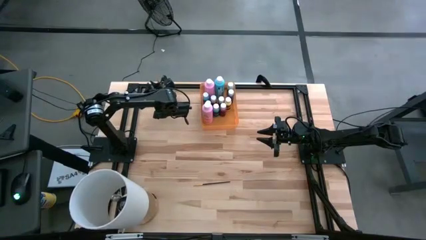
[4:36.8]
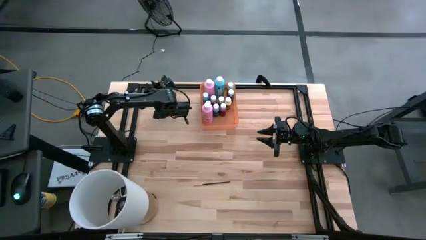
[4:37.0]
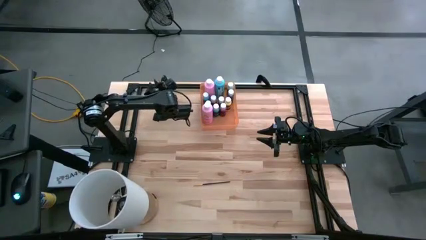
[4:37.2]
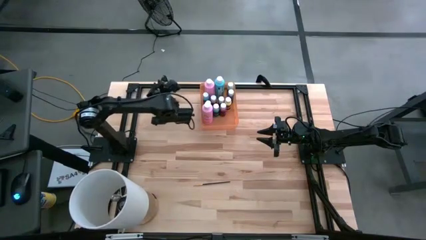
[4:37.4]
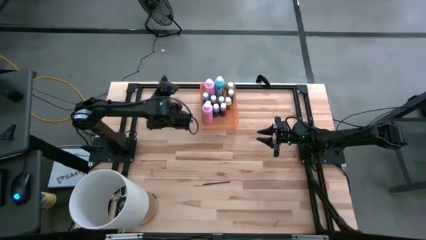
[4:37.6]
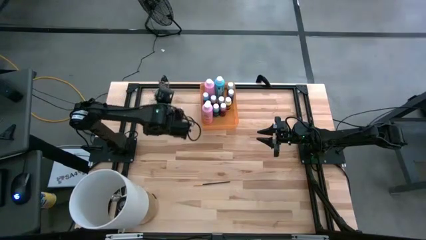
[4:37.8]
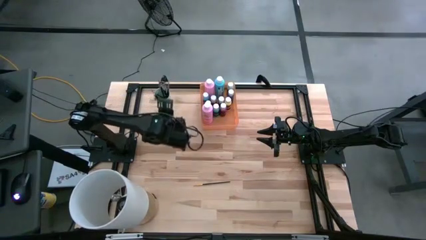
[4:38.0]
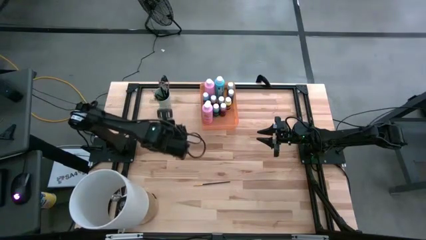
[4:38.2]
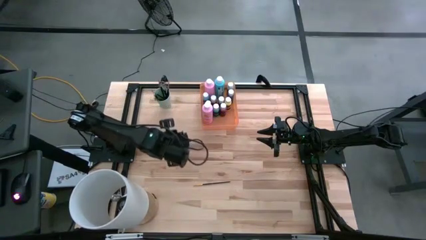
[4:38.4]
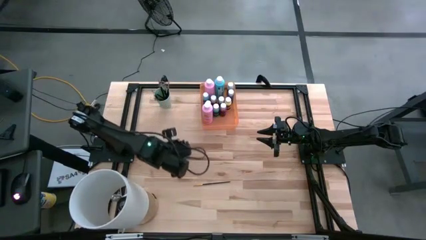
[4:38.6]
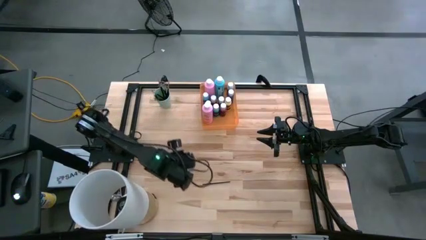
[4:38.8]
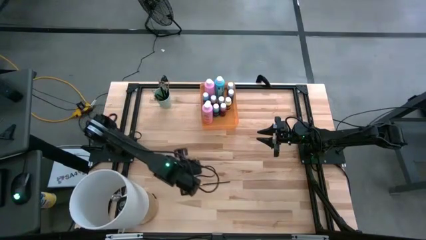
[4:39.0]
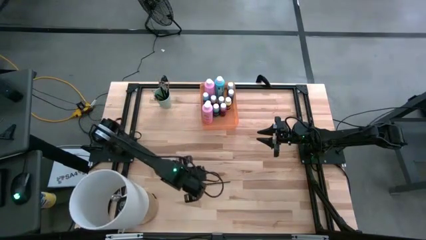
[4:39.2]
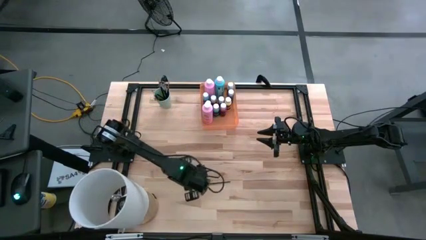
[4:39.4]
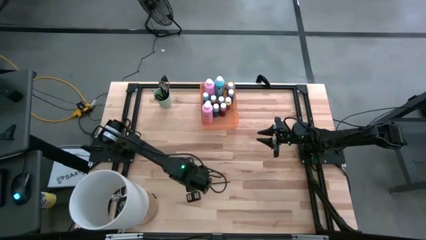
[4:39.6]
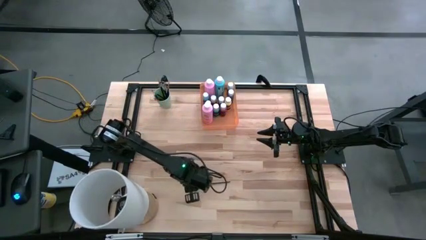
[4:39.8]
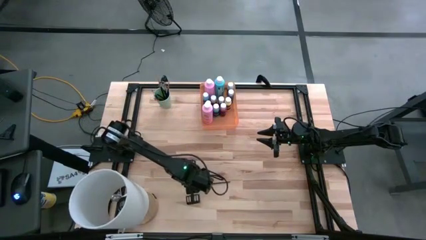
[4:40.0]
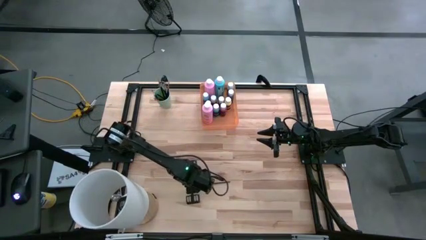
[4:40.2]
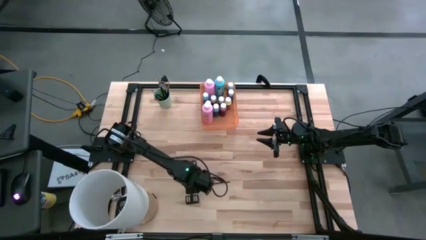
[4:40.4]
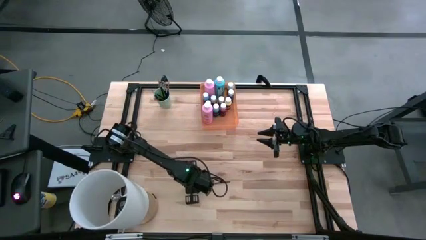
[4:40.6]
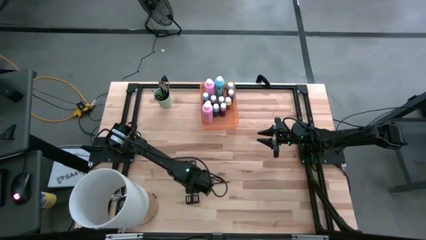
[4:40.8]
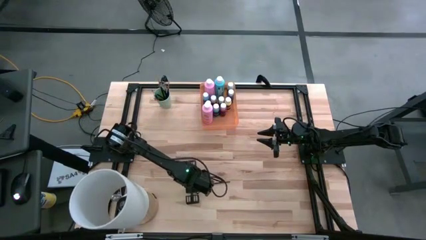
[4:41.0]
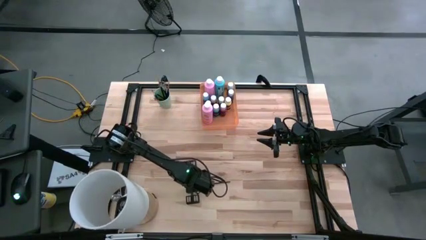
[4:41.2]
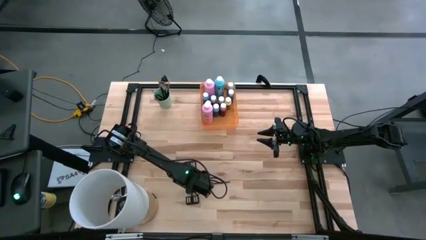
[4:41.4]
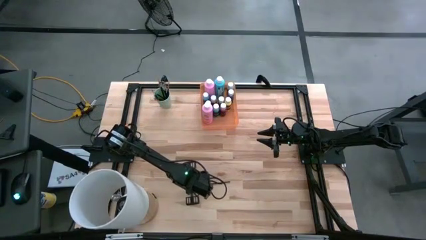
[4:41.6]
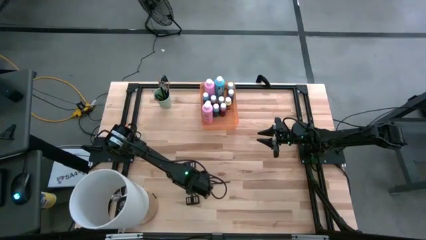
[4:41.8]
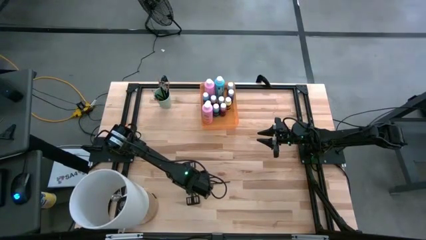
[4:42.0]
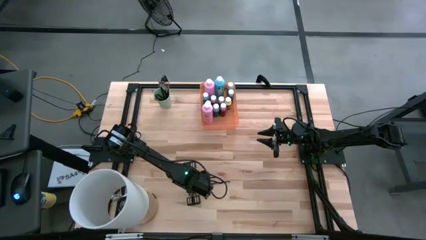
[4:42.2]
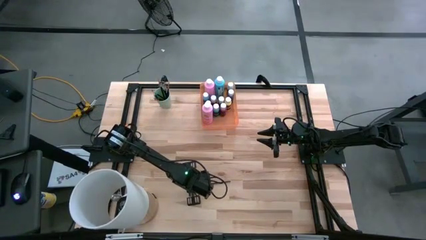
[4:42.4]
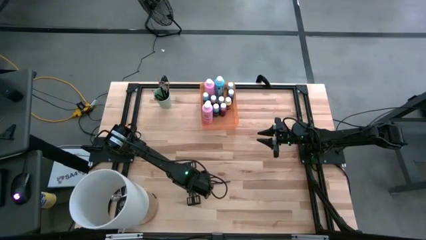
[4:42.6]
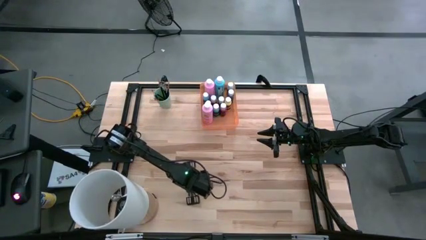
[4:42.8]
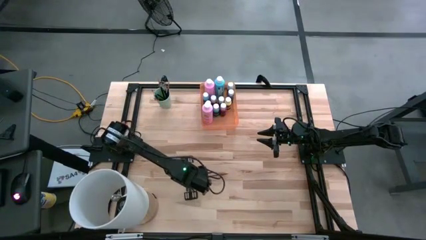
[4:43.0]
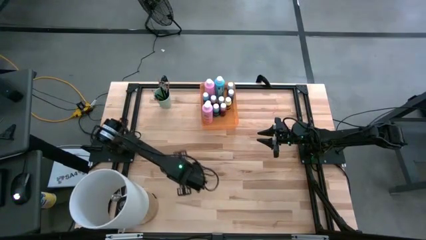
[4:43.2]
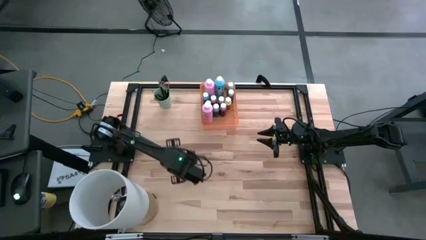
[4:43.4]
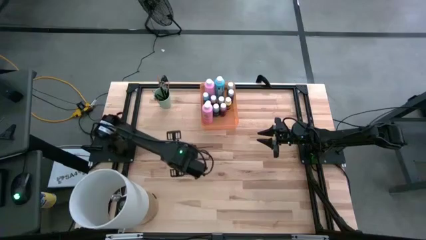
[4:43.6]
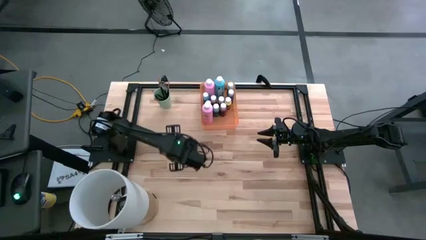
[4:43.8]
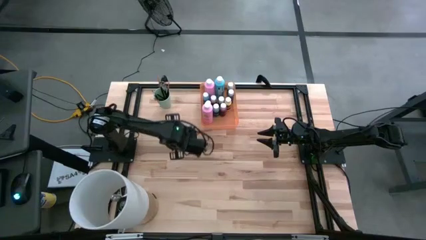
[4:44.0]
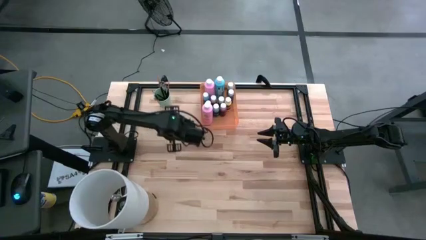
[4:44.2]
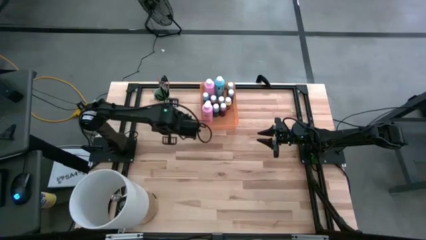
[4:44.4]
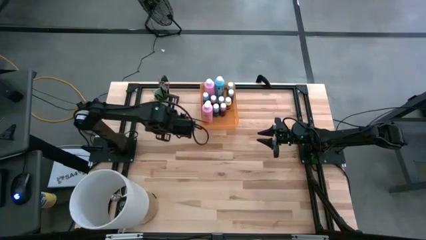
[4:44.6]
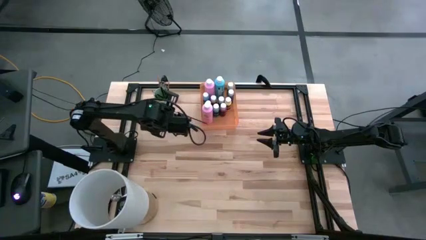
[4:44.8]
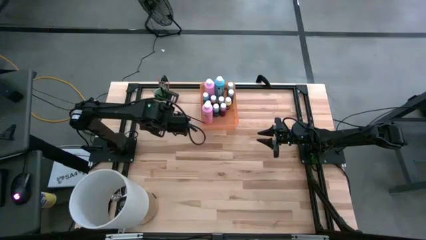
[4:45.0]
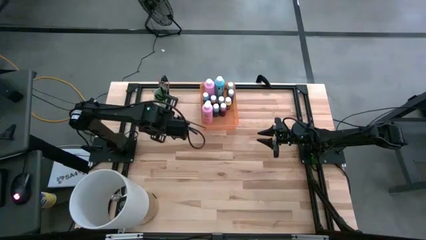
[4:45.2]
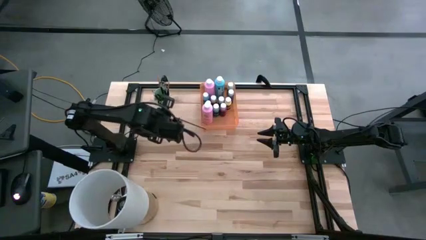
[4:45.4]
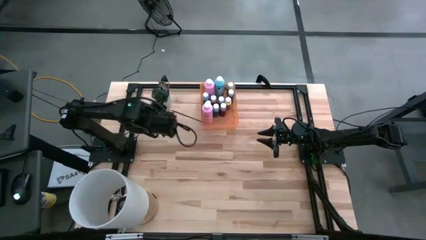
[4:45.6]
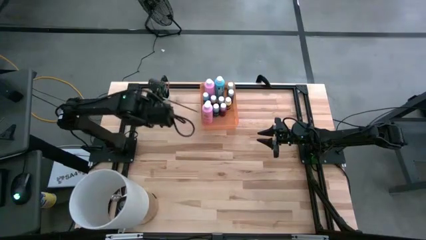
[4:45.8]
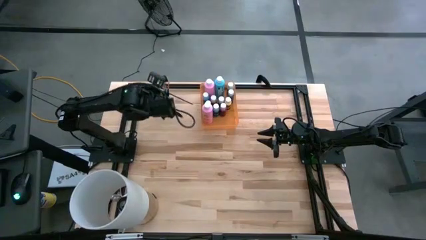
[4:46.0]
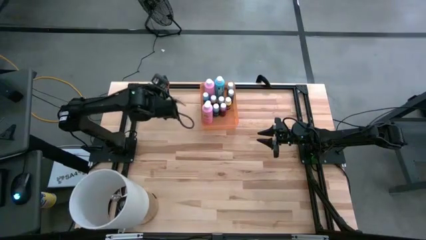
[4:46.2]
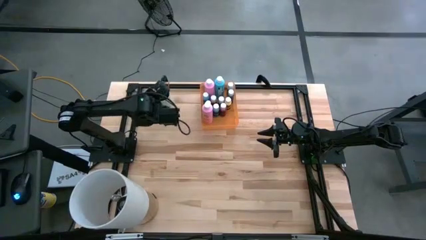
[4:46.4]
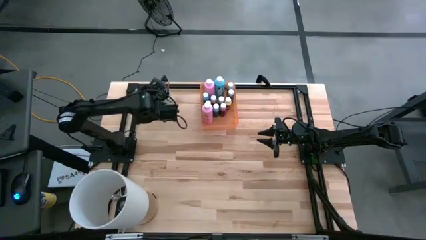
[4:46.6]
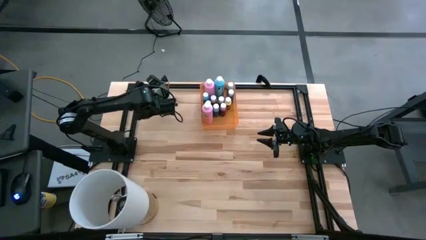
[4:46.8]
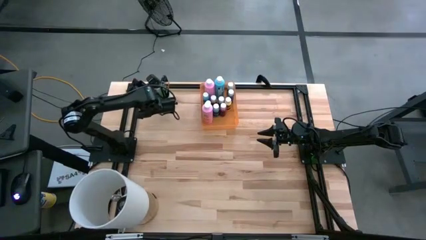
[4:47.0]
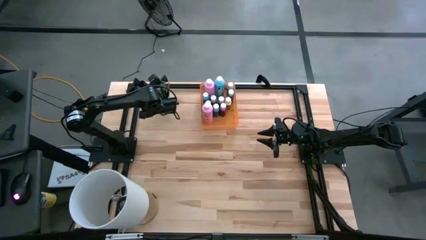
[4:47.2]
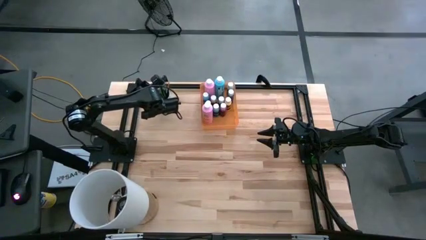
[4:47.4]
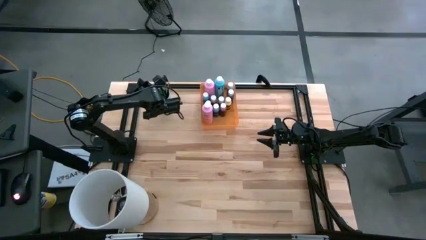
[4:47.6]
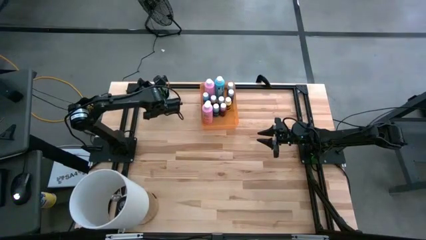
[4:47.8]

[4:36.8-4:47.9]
Task: Pick & Place Paint Supplies
Put the orange paintbrush into the cup

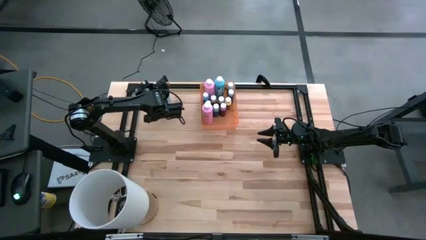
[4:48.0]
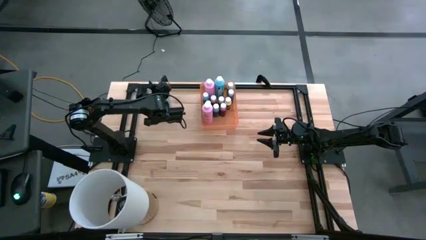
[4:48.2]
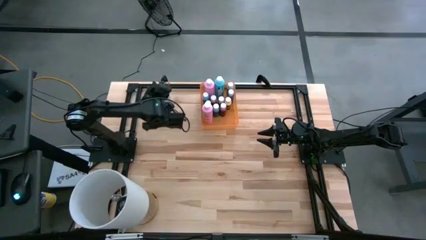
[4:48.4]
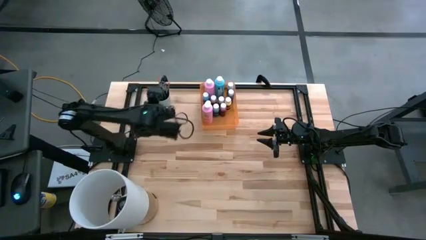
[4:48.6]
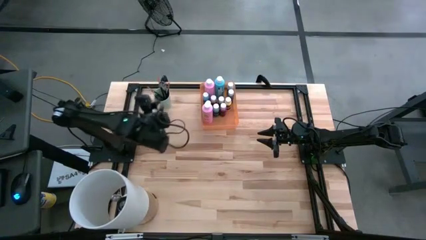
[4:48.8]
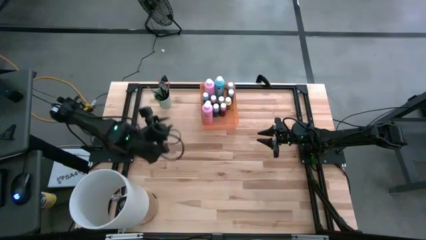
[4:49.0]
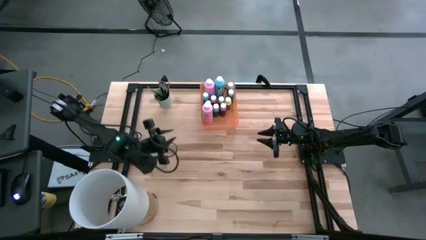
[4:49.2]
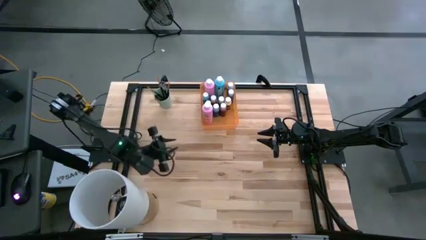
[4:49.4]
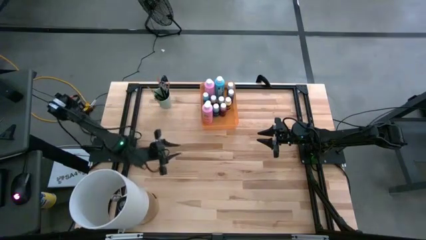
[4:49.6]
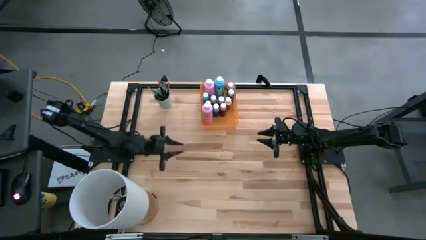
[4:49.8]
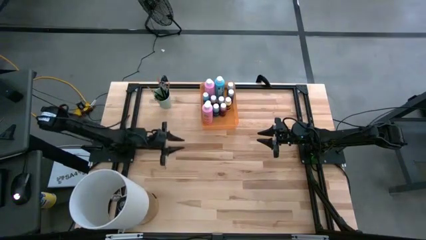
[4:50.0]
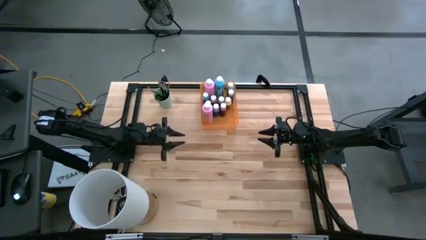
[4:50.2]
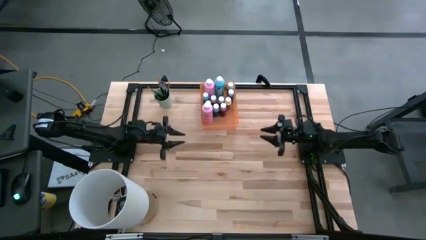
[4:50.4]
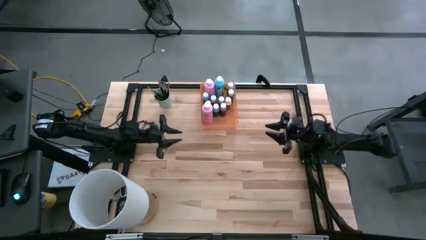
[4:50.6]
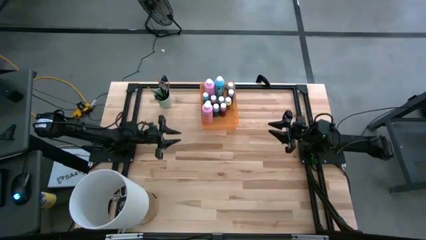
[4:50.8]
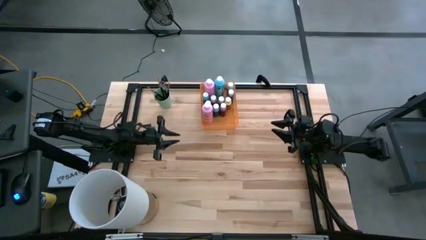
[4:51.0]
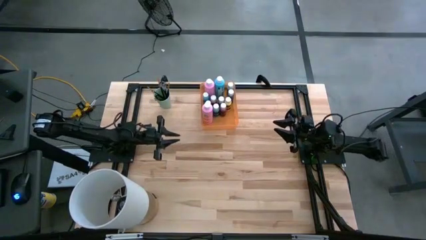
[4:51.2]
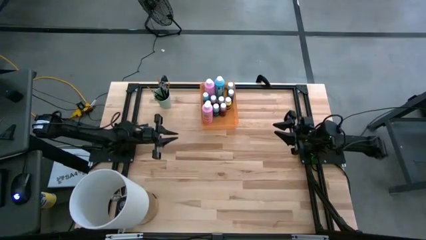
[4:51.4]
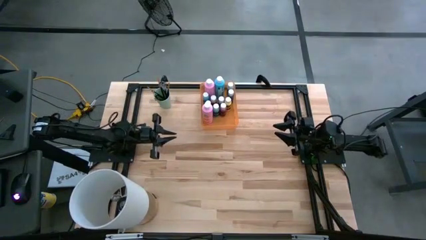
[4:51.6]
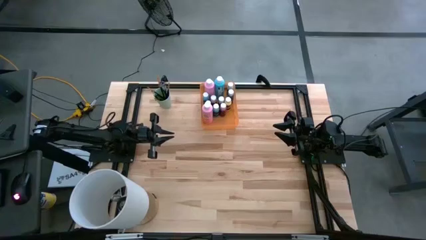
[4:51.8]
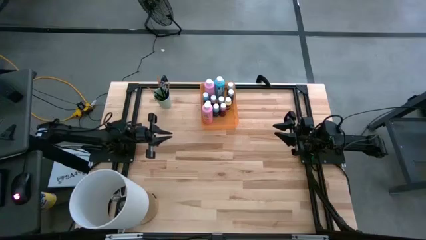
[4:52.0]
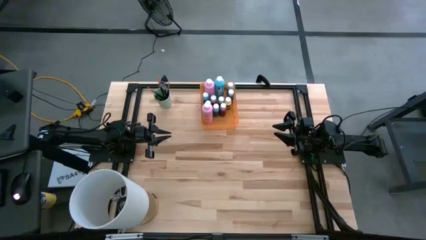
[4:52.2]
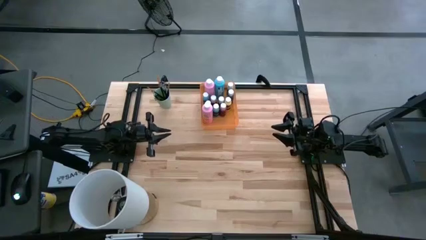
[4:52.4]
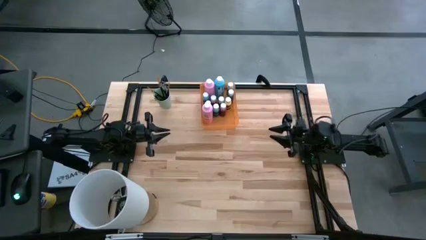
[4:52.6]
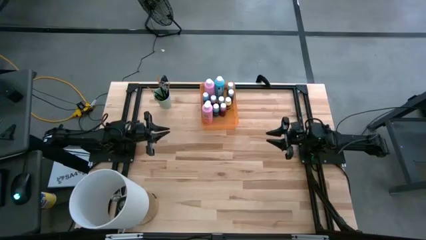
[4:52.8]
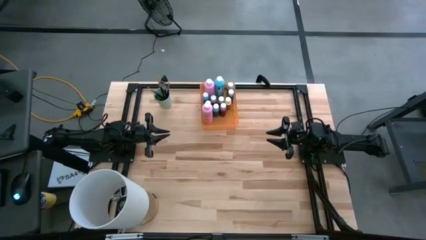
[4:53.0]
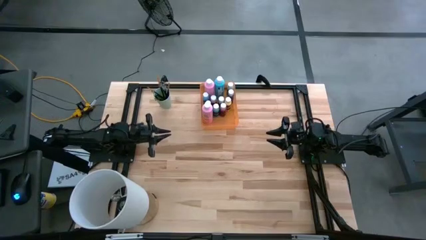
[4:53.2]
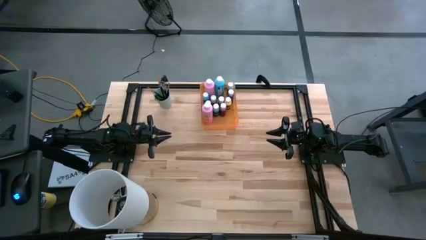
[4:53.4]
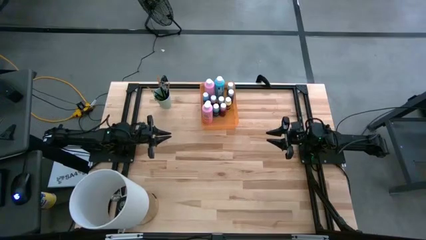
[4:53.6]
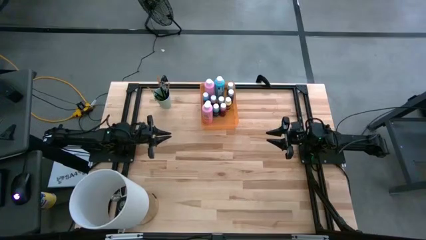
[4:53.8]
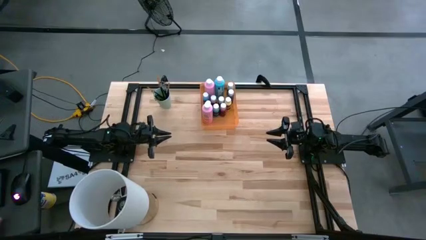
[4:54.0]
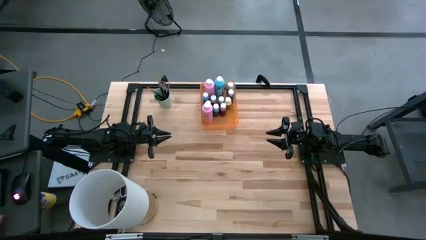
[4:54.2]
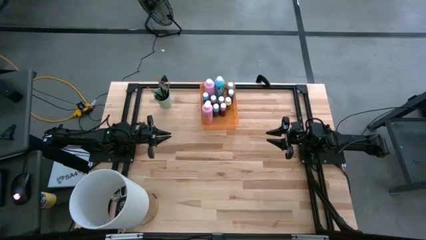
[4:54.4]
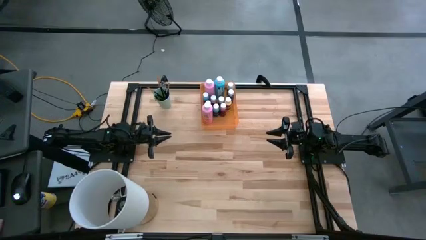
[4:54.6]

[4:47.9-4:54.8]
Return to Home Position
